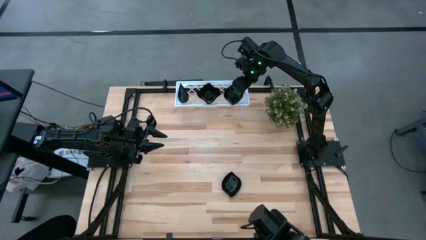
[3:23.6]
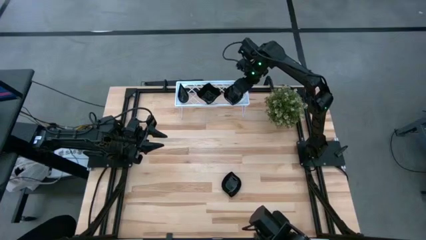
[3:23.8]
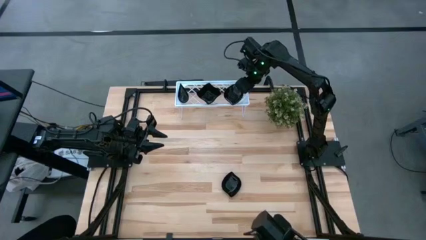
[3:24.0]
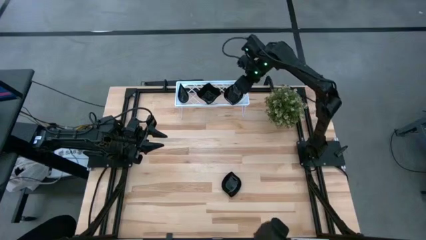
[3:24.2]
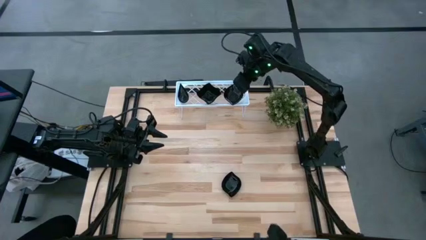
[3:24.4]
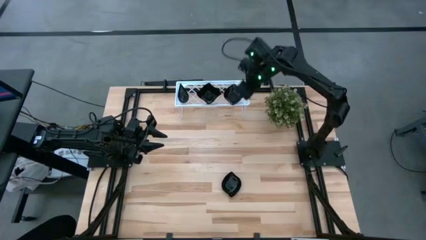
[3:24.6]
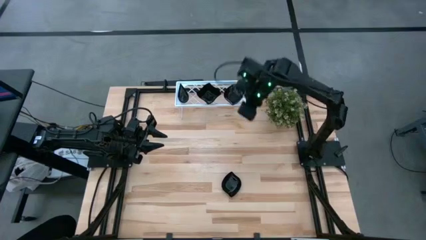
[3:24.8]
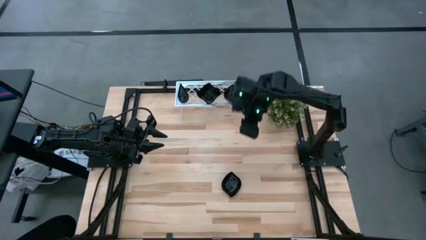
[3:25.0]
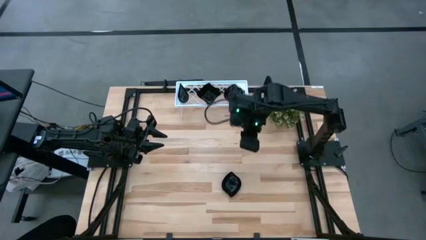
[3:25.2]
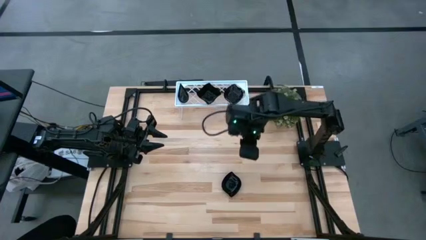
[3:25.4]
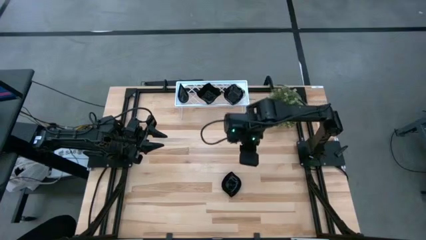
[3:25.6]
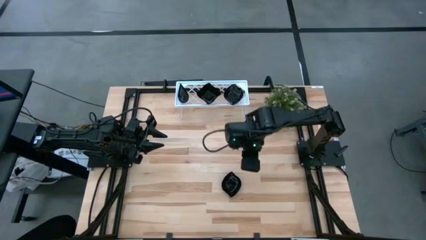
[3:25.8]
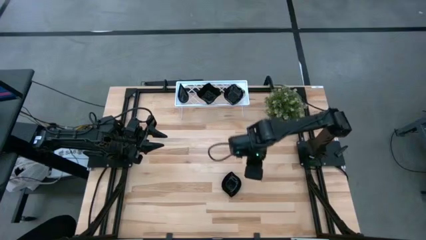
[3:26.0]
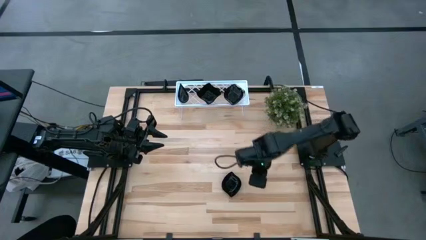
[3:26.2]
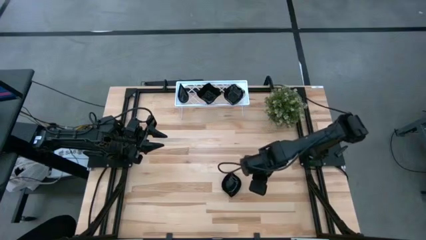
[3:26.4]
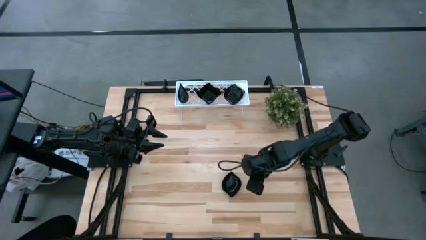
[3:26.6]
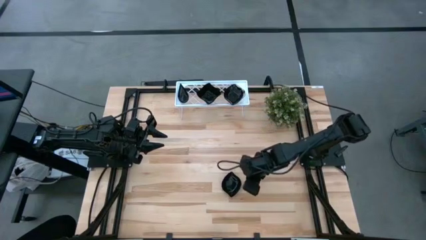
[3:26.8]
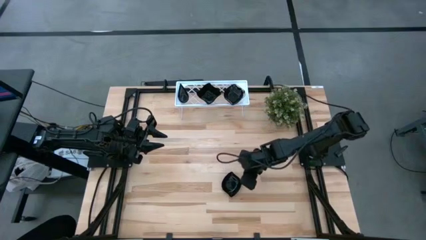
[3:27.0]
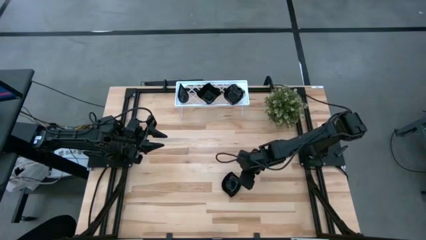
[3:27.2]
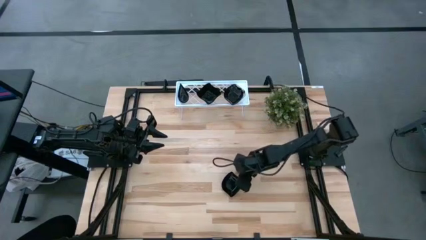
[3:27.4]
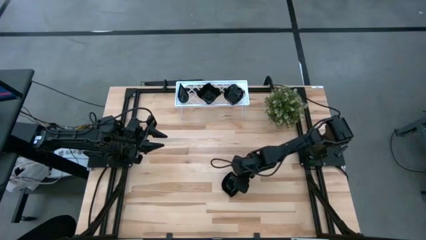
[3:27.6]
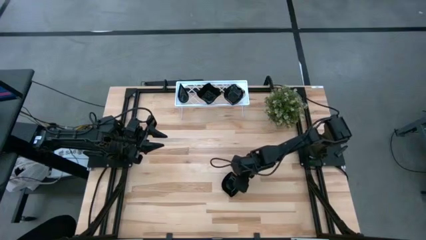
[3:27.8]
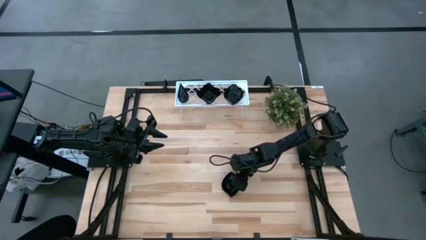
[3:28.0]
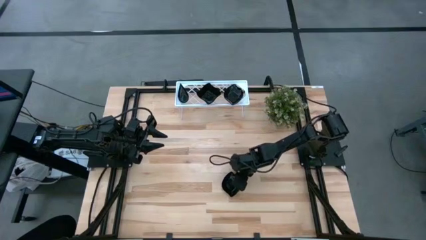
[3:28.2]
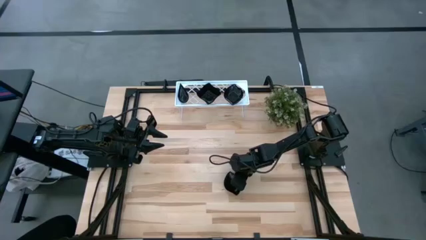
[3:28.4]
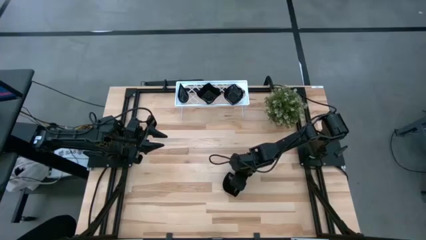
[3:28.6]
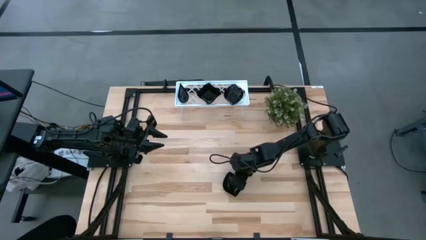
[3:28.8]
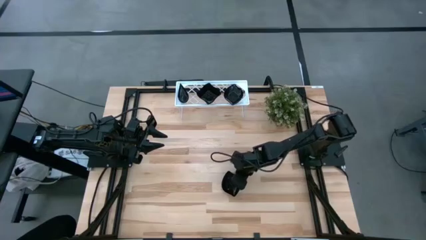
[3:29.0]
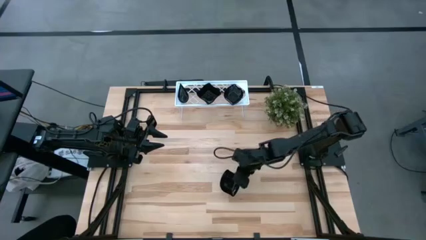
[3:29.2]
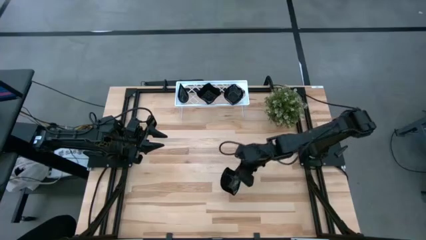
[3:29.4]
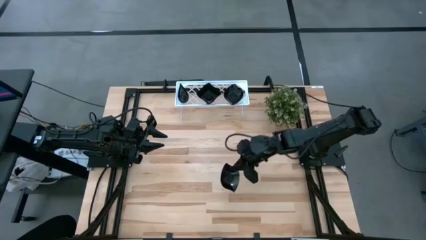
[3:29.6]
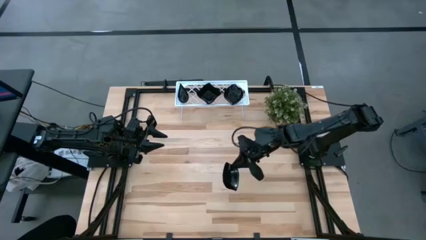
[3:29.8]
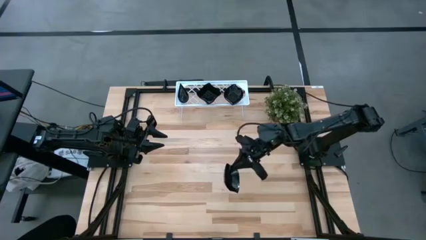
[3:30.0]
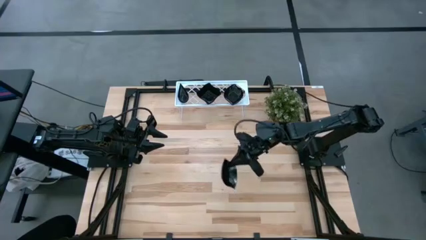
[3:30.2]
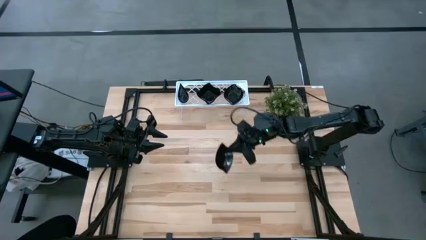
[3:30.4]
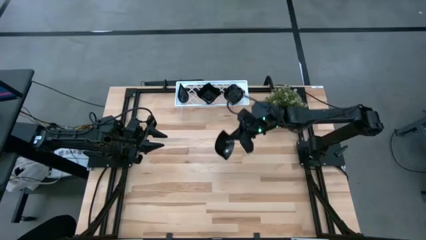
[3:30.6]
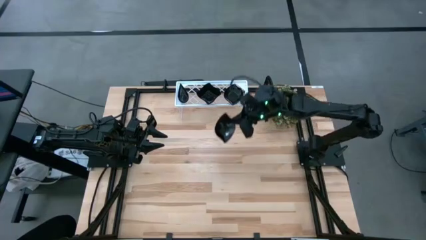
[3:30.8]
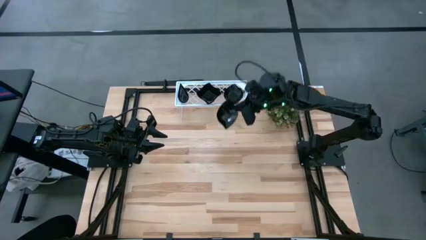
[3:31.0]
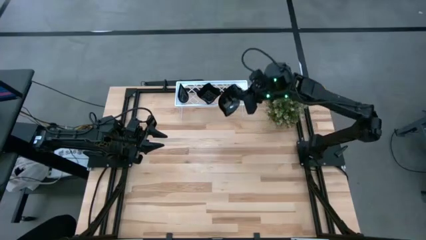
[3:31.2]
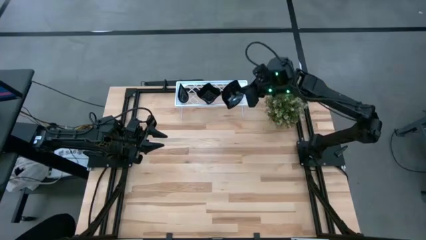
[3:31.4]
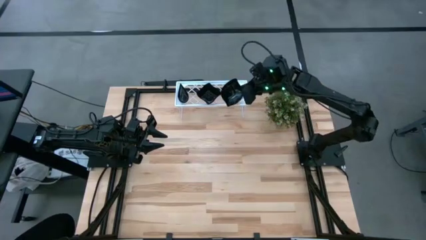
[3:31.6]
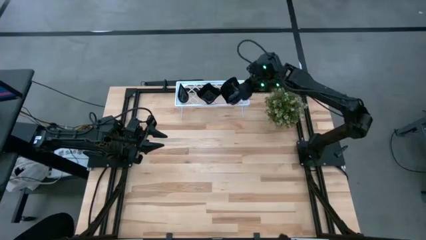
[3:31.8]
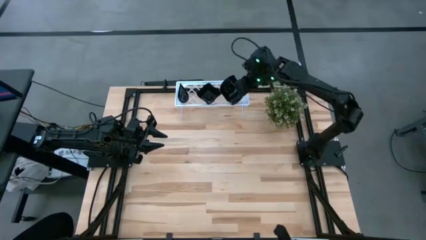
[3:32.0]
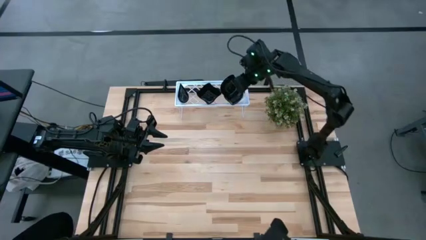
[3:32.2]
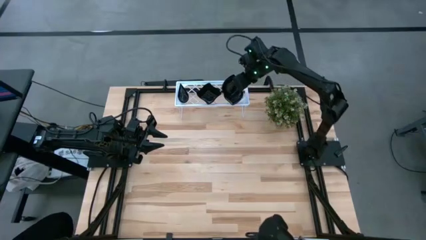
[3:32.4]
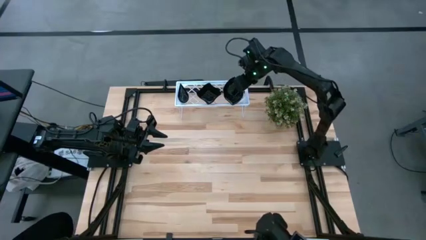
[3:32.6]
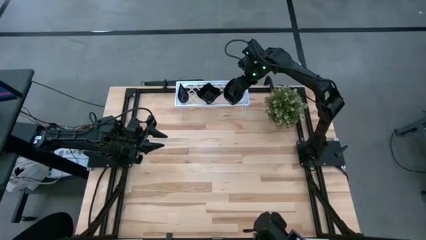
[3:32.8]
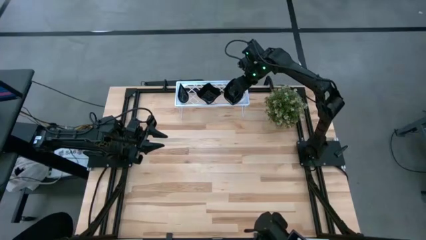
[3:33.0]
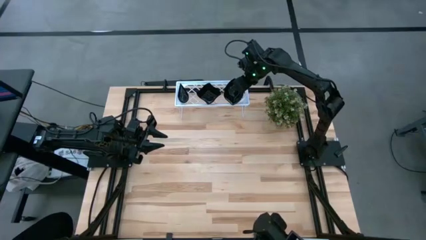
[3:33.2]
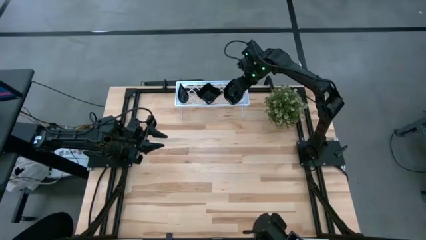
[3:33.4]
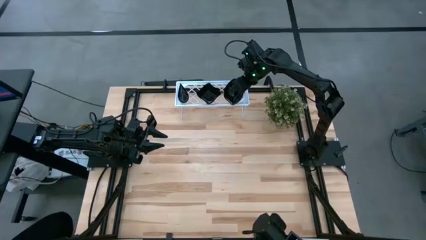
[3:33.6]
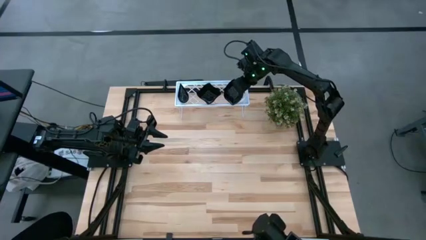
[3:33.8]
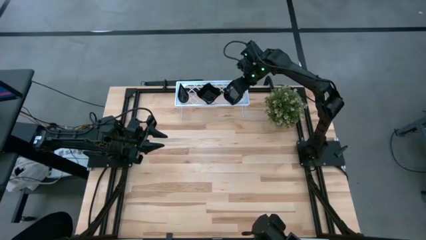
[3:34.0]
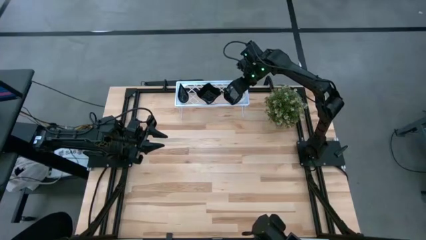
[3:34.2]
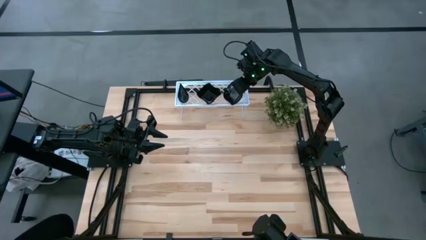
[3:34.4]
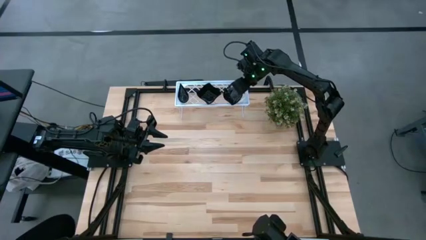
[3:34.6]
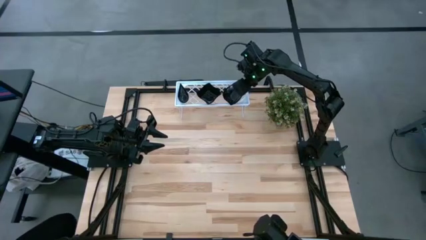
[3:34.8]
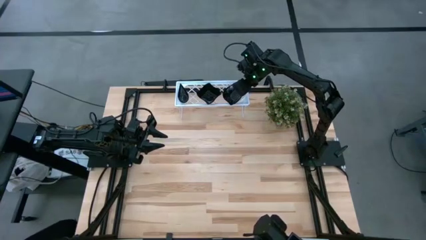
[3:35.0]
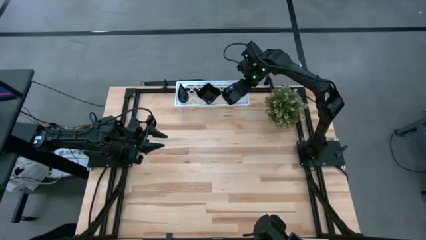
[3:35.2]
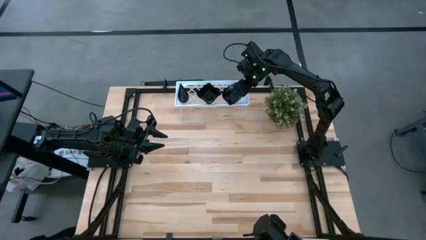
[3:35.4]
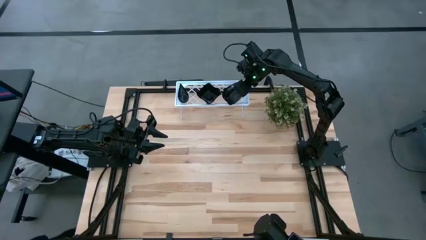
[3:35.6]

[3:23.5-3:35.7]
Task: Pick & Place Mini shaped plates
Stack the leaf-shaped plate on top of the leaf-shaped plate on the shelf

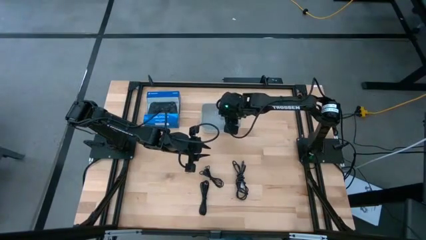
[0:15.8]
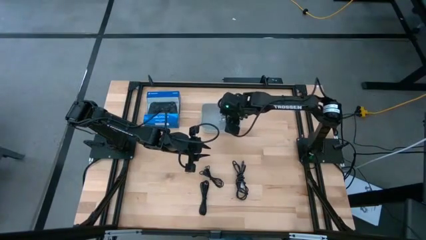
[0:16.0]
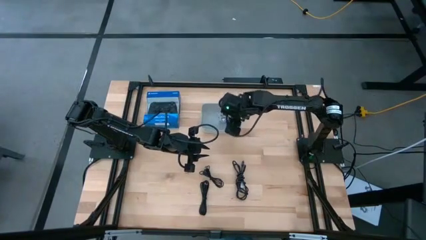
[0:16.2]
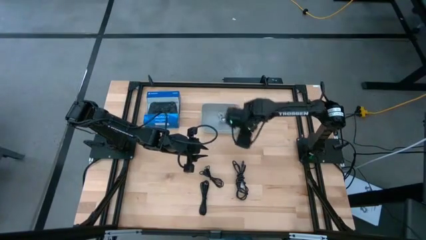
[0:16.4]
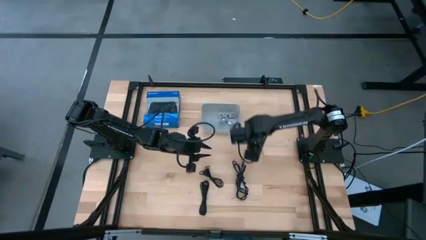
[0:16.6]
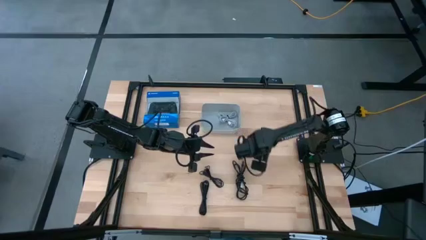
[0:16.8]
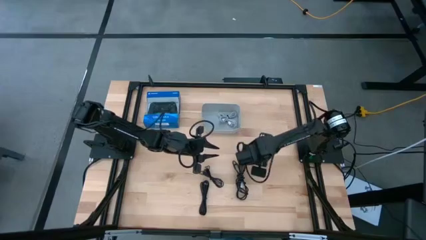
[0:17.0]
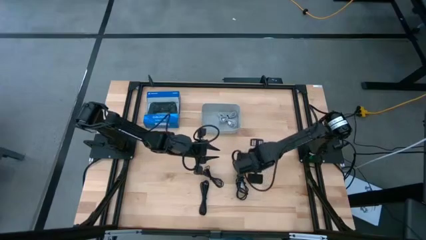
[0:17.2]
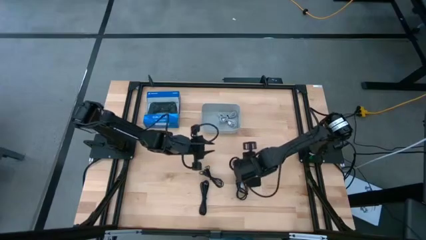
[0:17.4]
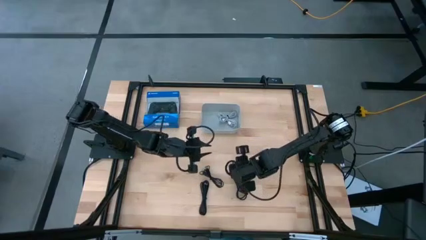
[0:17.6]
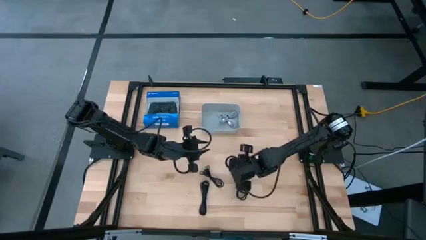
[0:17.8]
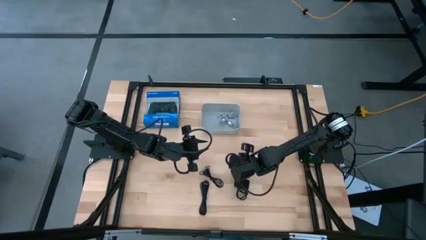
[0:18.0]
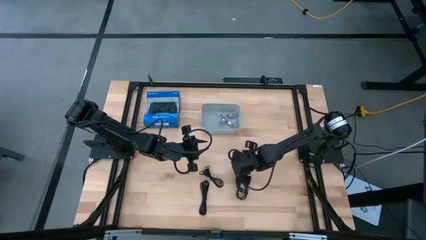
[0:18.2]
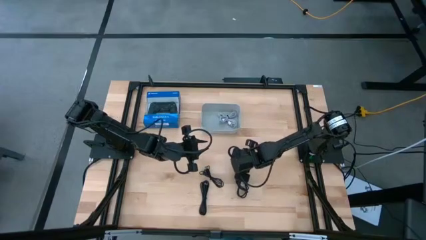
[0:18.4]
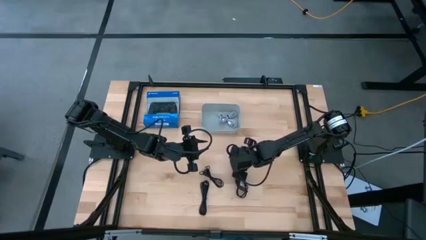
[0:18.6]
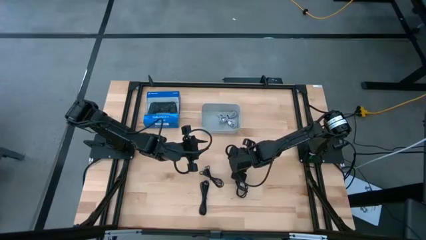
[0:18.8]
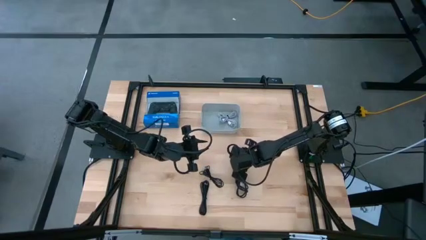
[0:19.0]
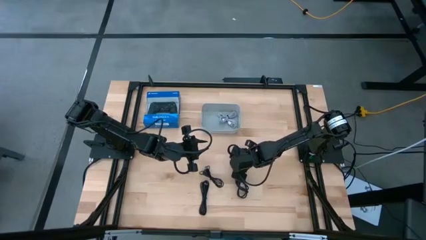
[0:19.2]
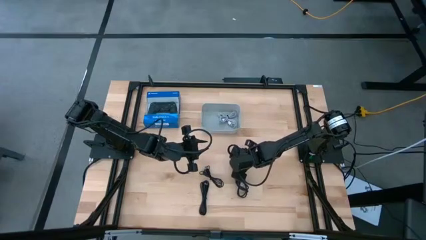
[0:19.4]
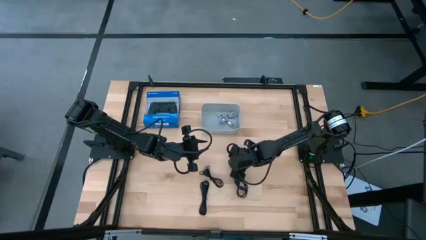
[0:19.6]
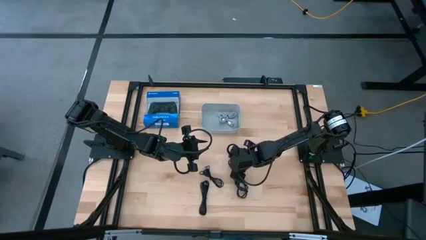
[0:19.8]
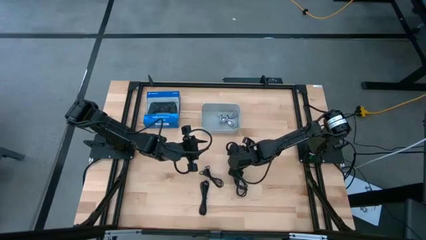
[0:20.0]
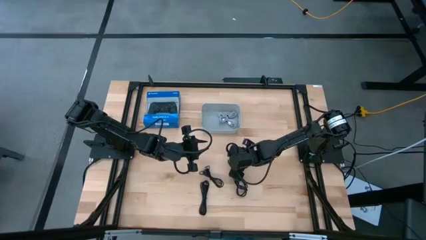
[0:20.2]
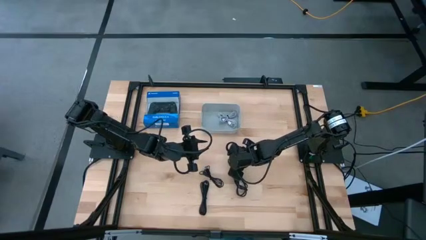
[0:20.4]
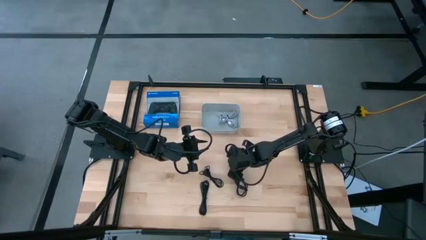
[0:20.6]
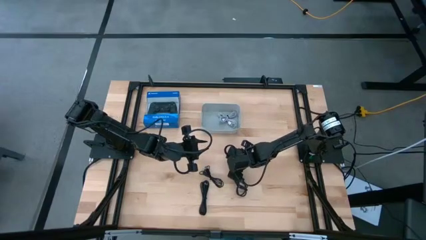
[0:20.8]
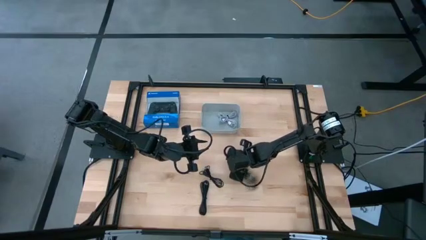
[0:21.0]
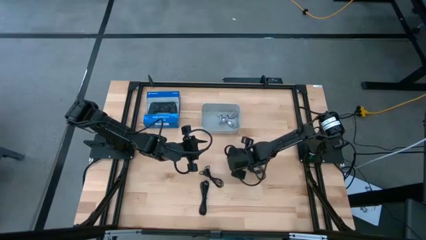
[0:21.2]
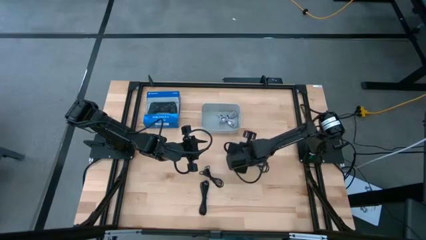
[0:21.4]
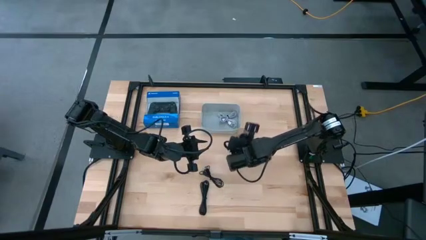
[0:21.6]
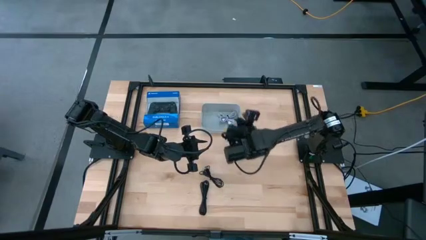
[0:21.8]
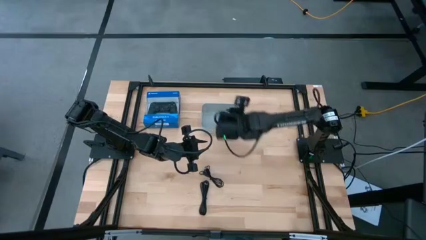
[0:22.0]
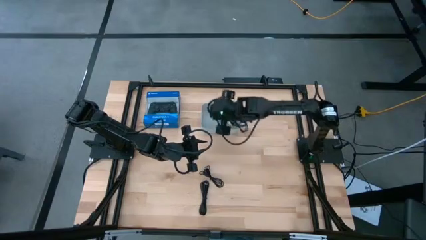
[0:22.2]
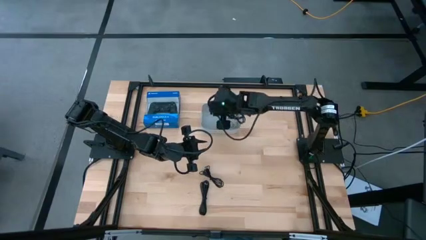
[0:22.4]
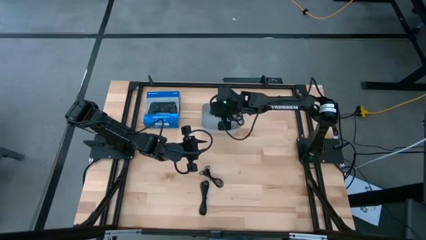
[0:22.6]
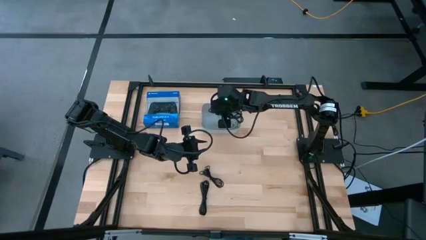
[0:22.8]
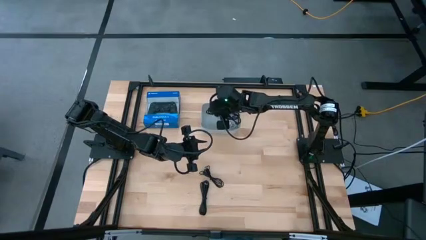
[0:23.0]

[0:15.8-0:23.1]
Task: Pick and place USB-C Cables
Put the top right black charger cable into the white bin
